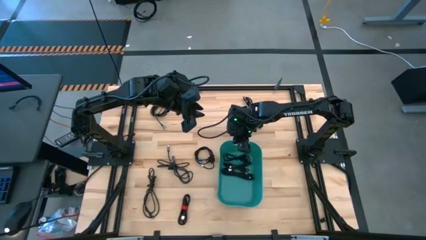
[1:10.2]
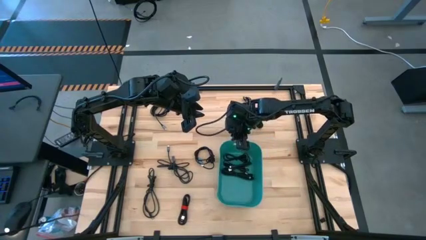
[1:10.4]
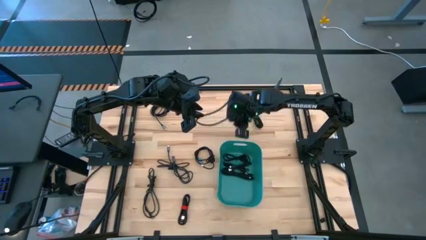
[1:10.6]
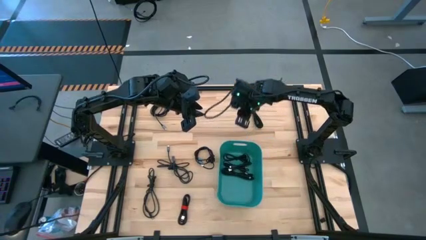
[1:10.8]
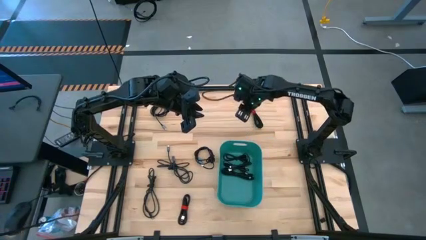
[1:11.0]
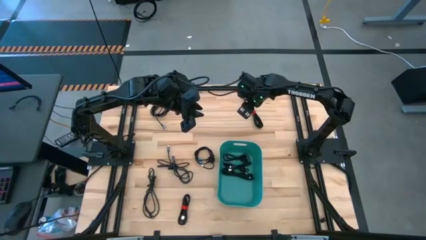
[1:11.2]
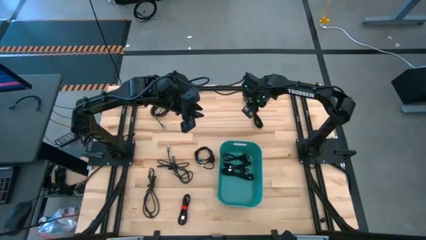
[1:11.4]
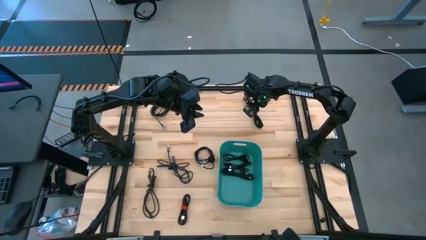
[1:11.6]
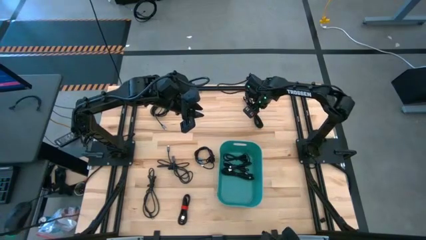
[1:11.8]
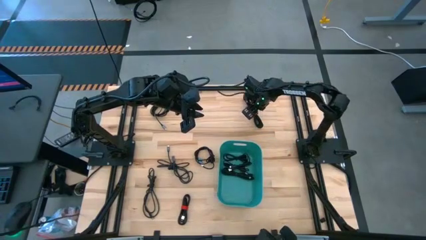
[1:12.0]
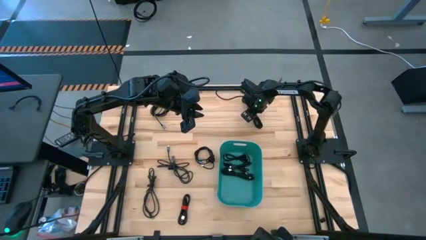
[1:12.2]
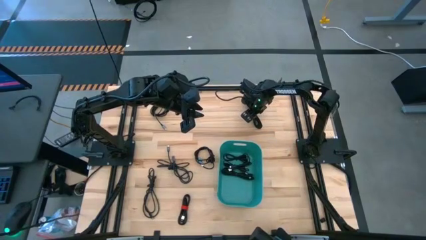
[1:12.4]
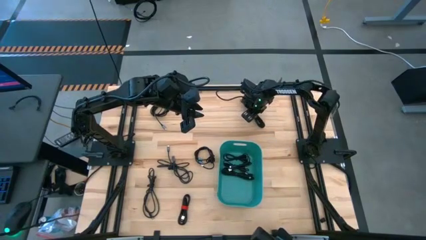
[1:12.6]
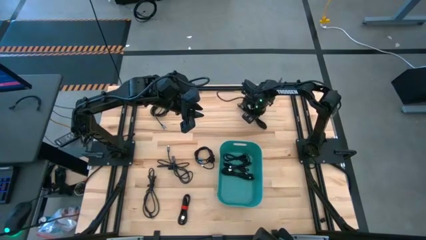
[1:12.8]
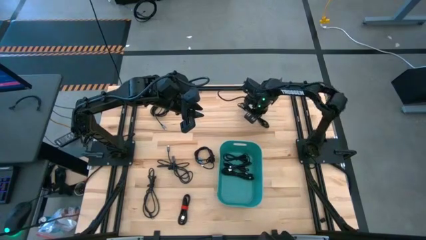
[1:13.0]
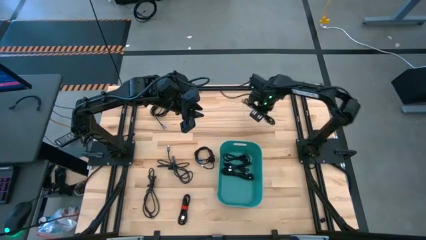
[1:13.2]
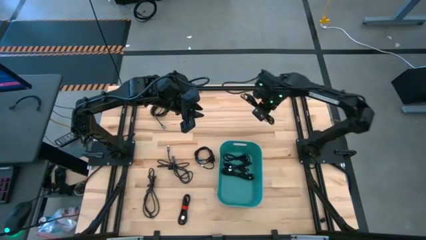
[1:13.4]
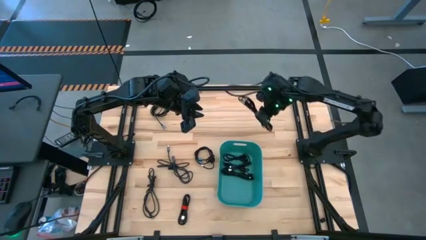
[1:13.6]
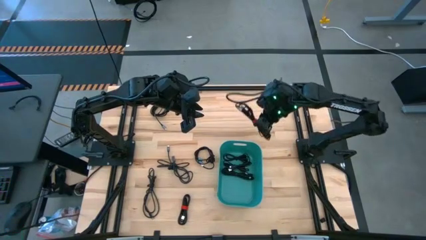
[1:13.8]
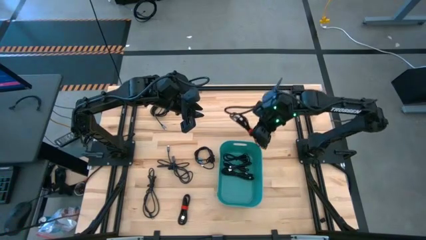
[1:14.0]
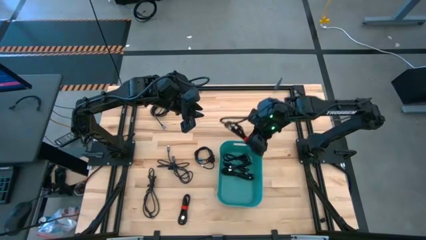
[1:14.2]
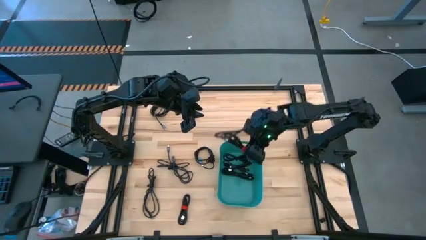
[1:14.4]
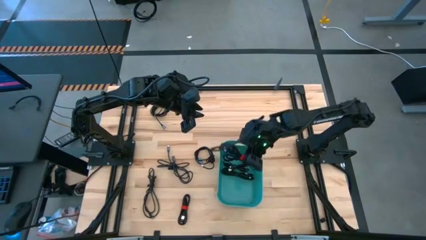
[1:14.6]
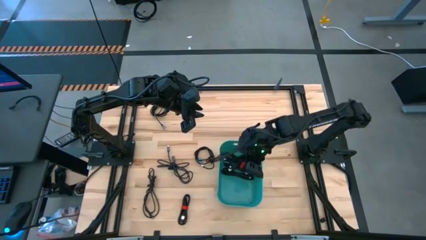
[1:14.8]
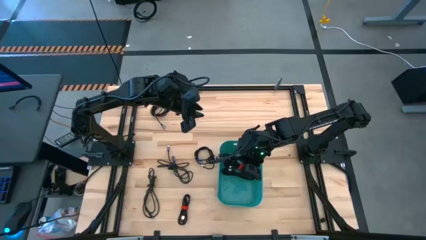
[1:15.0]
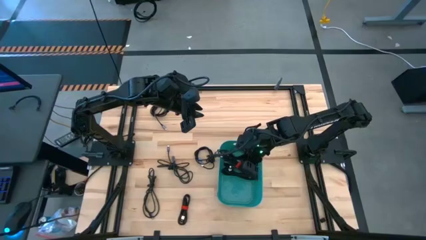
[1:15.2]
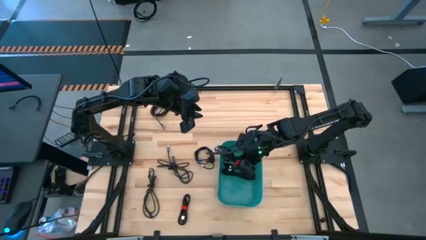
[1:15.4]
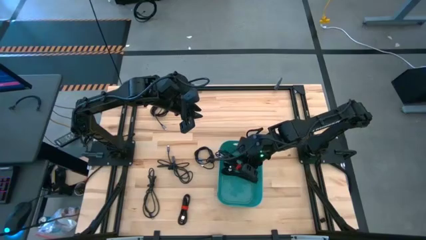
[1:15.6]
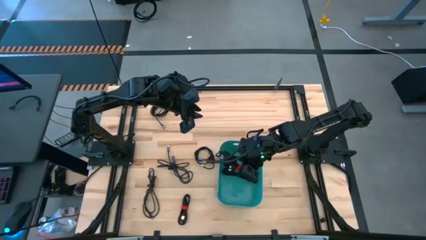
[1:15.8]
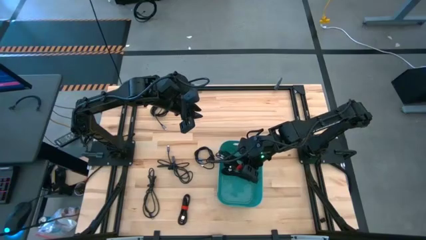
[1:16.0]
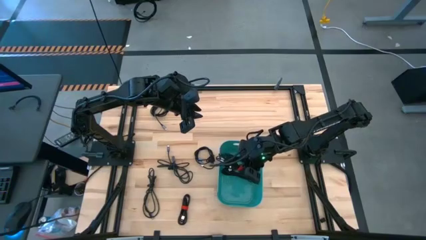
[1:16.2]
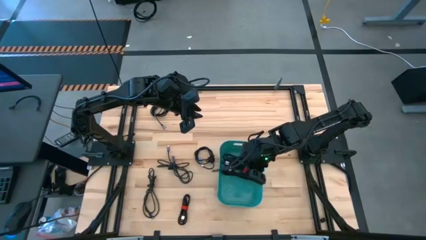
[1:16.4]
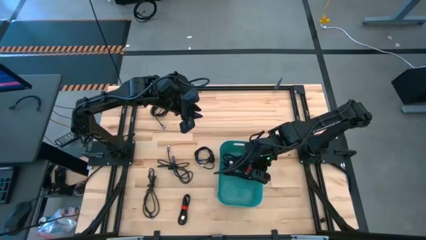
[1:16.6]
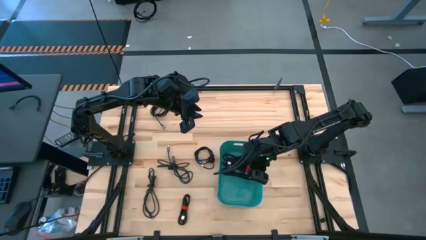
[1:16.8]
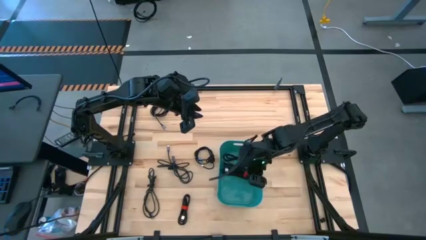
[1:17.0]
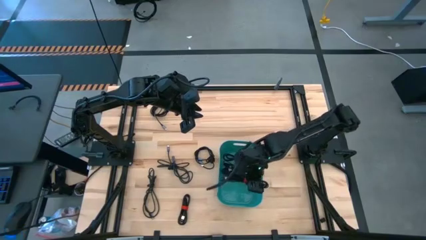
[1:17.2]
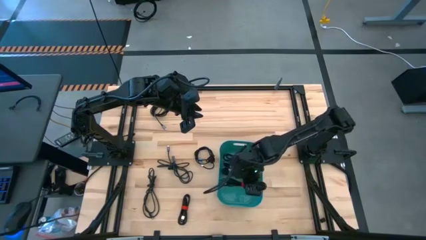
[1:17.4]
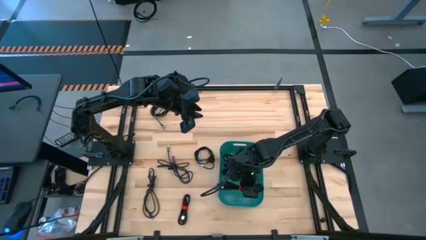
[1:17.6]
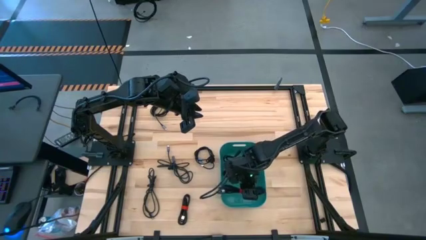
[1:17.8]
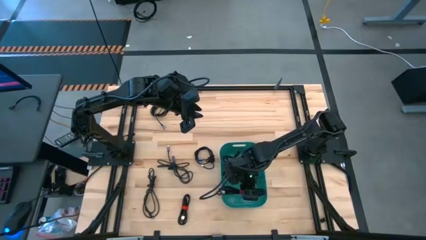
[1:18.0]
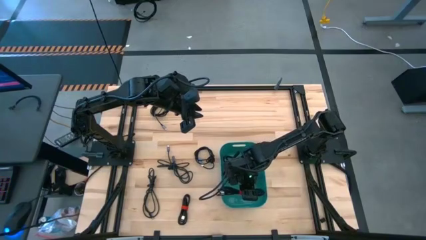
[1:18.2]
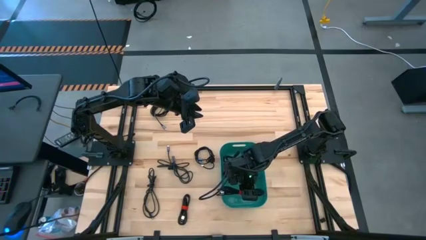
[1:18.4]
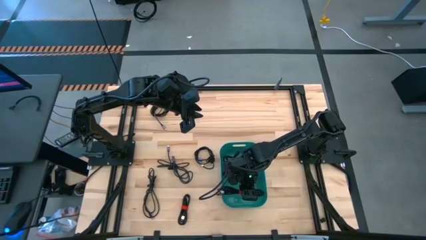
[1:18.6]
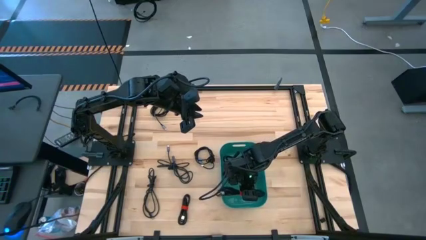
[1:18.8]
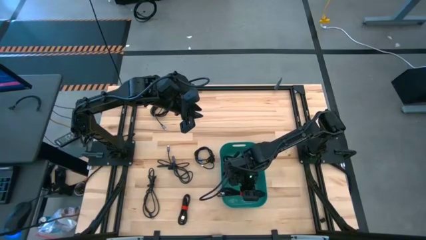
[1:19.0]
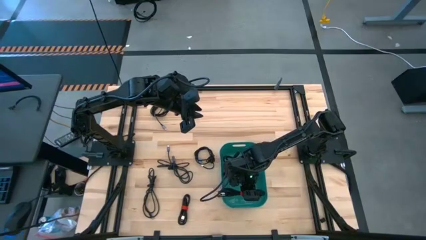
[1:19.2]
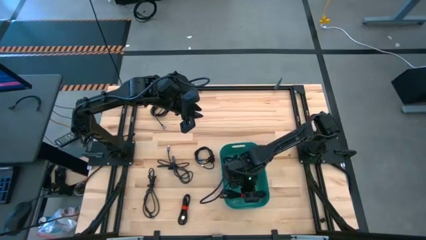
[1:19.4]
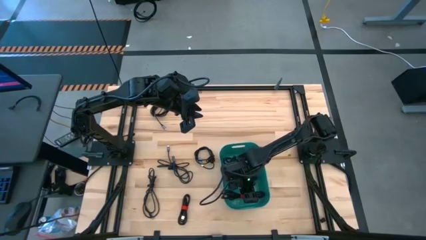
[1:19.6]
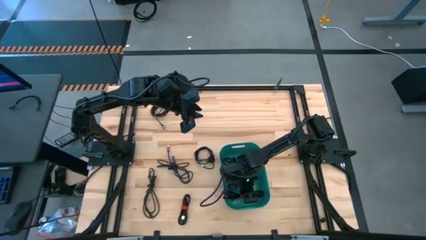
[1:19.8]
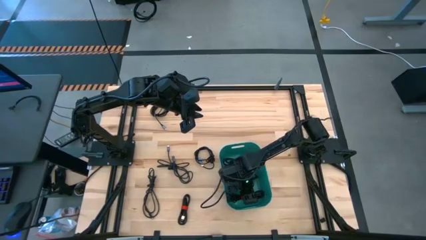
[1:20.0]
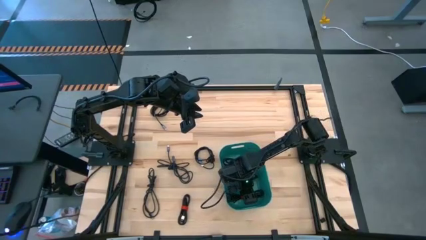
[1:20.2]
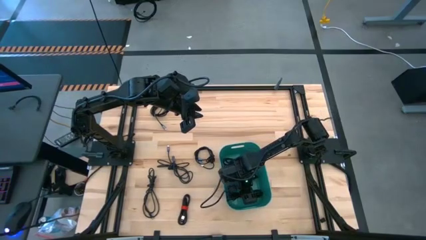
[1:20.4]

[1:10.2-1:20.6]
Task: Pick and place USB-C Cables
Put the black charger cable into the green bin

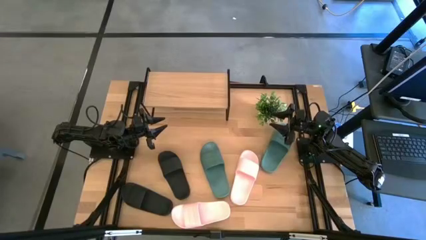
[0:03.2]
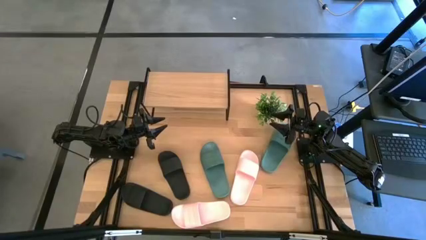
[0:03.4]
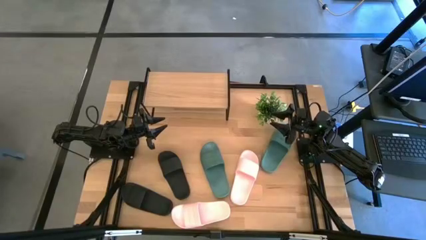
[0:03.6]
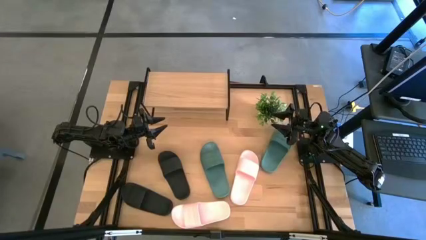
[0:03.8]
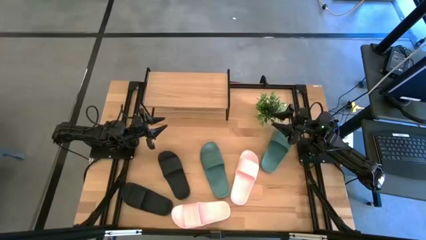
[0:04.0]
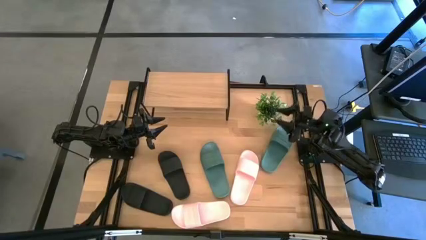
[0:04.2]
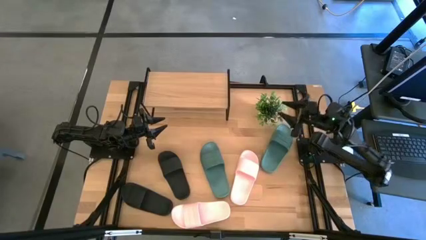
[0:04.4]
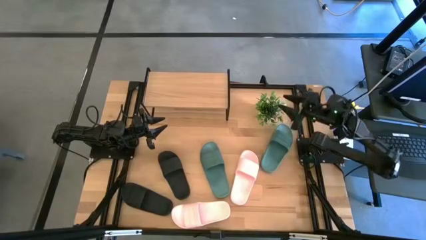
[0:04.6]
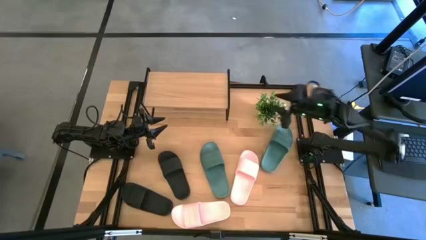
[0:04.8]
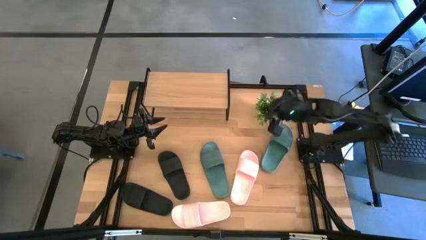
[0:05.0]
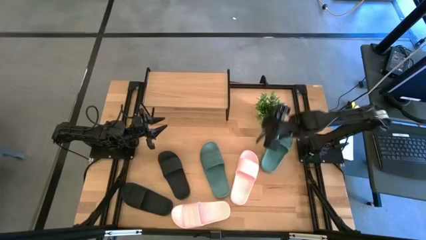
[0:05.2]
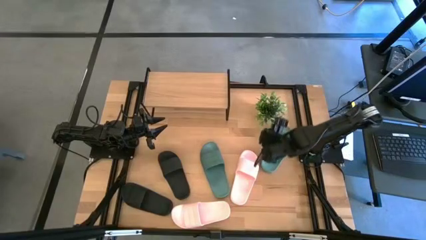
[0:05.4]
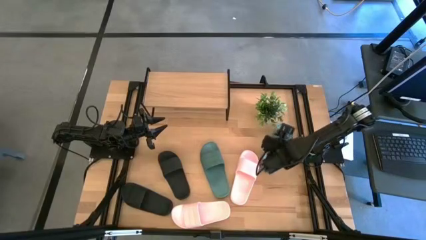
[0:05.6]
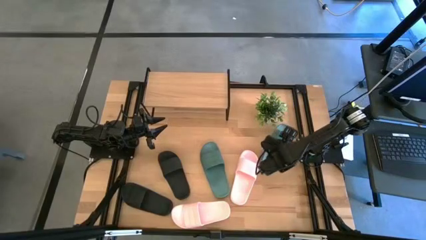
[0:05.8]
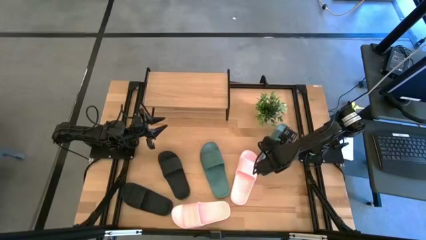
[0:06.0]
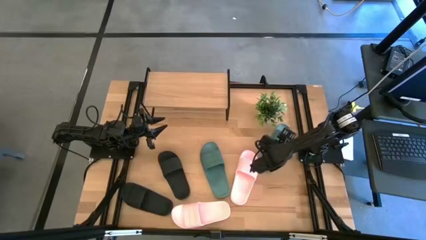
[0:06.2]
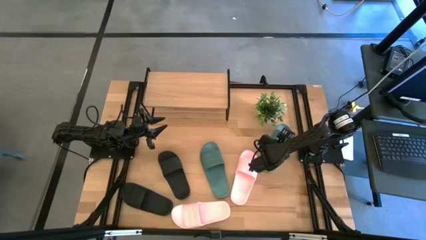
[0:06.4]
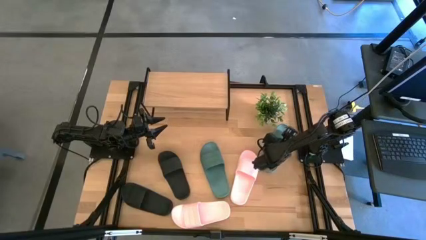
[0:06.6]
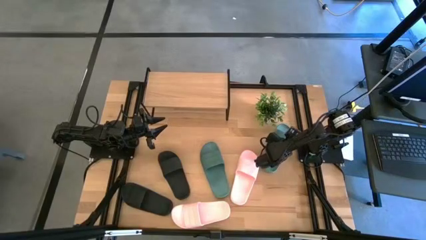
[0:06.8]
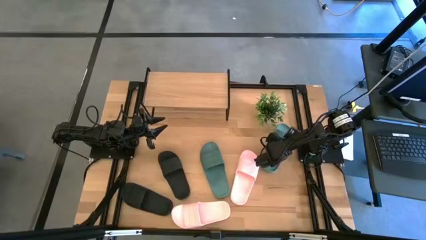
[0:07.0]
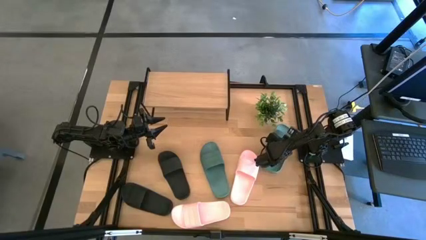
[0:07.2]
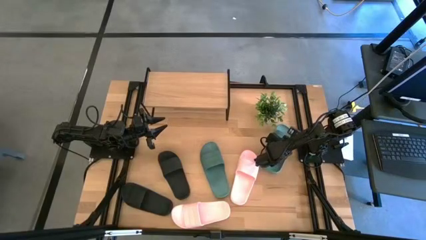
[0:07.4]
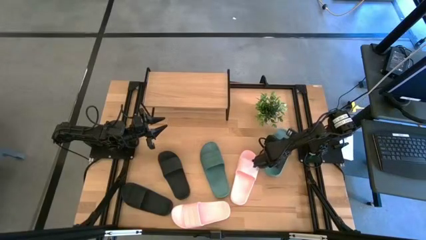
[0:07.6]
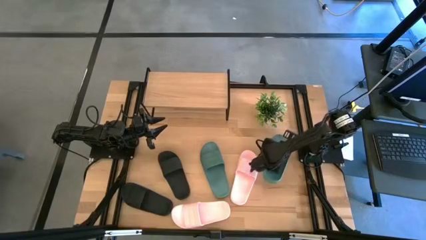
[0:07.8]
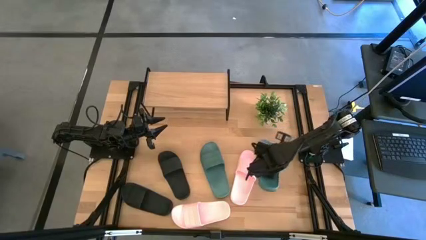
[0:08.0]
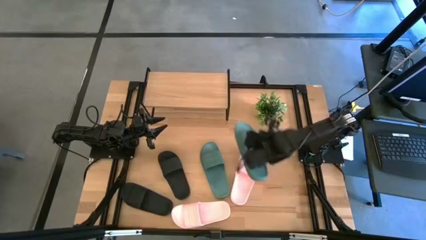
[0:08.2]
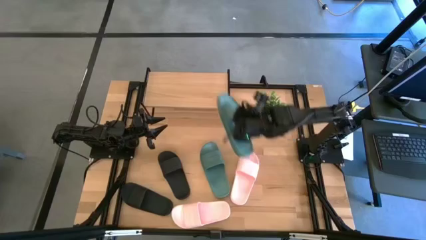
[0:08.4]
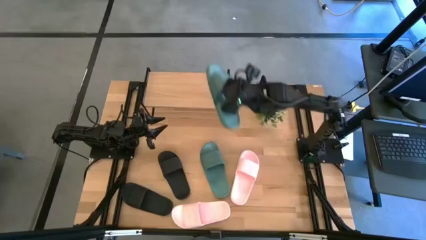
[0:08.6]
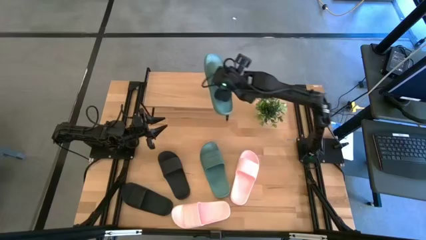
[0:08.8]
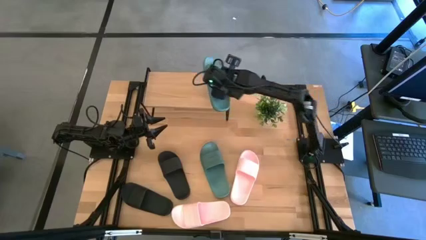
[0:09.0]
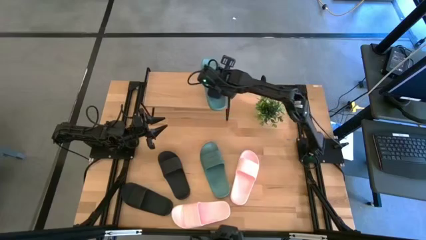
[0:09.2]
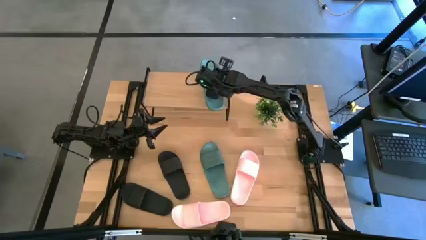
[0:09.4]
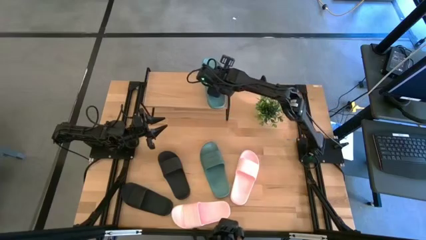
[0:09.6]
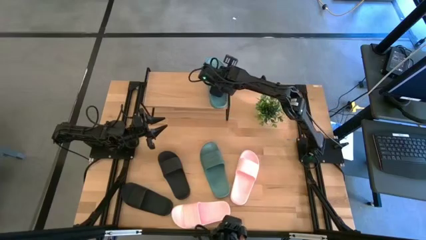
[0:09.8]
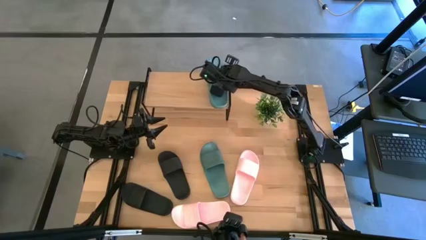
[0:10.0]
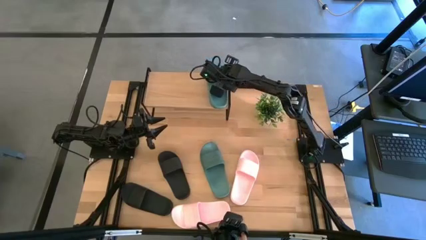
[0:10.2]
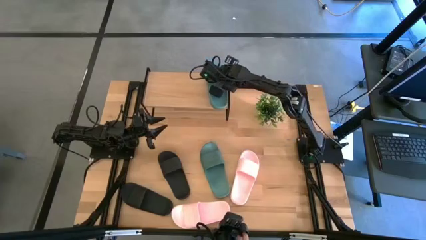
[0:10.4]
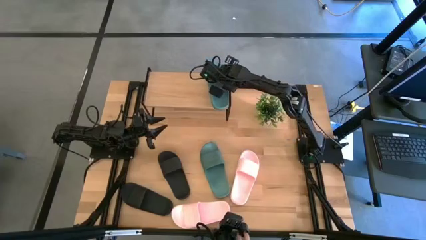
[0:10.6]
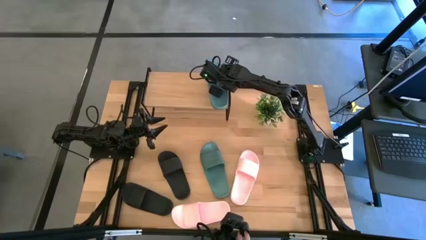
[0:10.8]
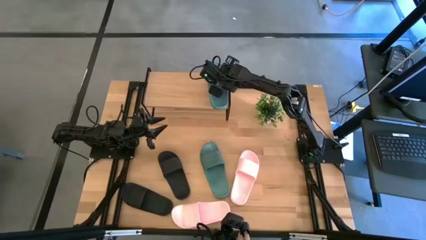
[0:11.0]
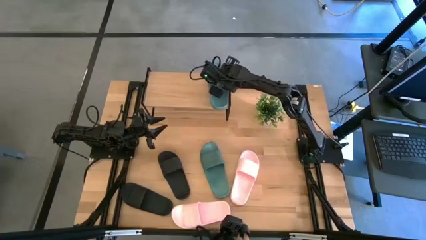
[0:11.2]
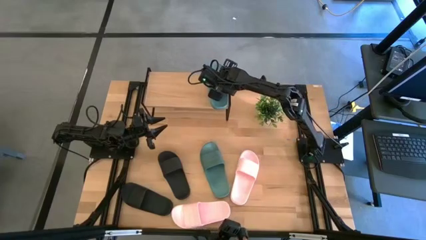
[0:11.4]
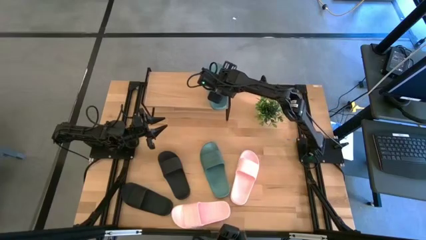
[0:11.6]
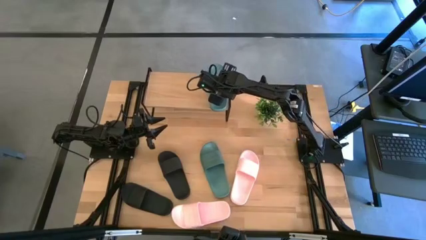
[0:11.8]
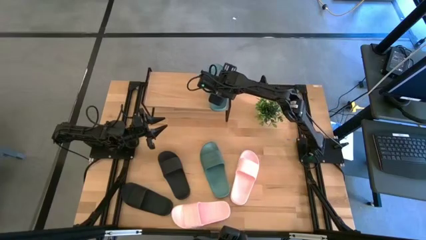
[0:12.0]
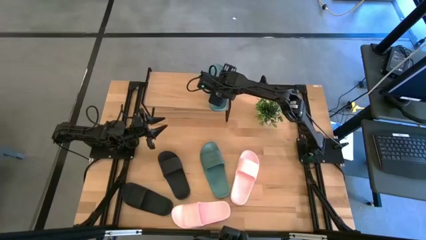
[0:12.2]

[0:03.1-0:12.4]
Task: Pick and place slides into the shelf
Put the right light blue slide on the shelf
